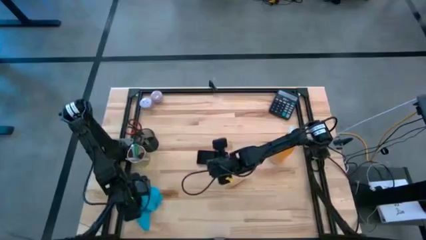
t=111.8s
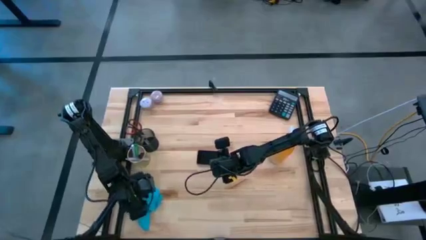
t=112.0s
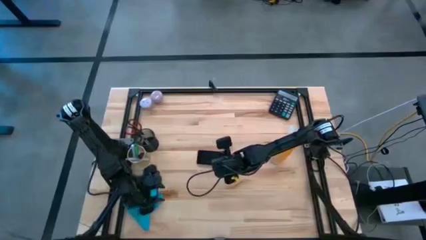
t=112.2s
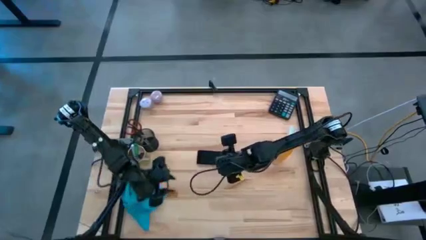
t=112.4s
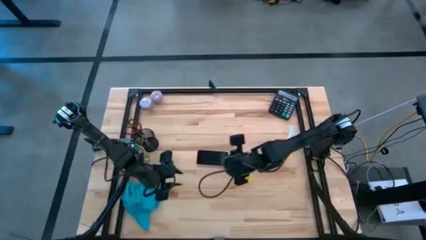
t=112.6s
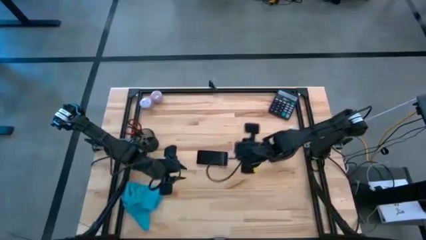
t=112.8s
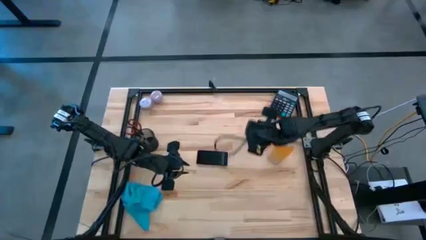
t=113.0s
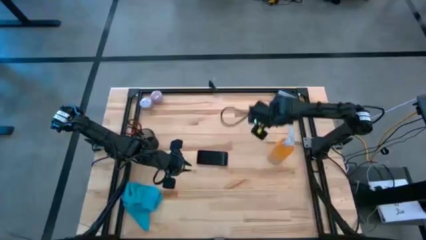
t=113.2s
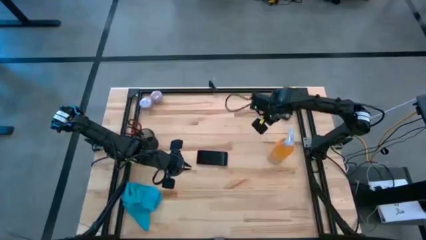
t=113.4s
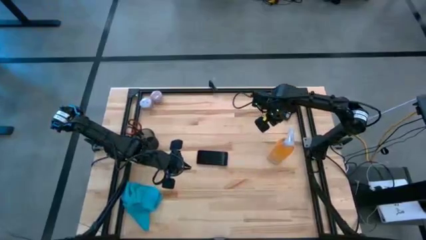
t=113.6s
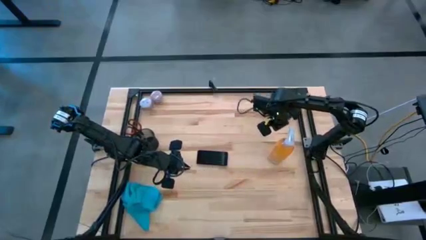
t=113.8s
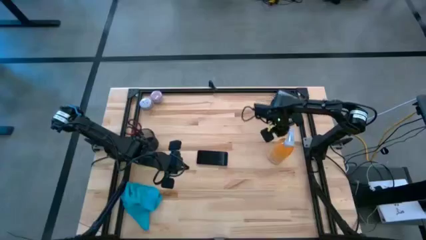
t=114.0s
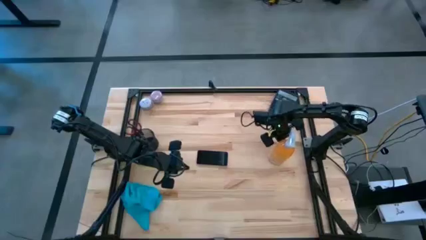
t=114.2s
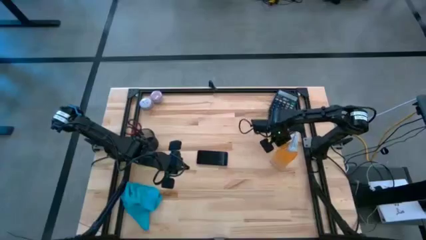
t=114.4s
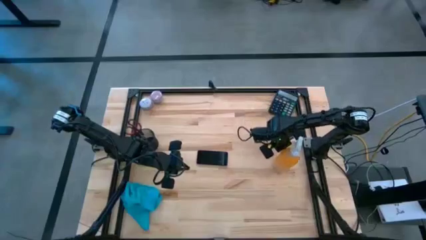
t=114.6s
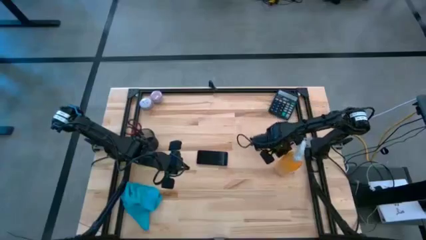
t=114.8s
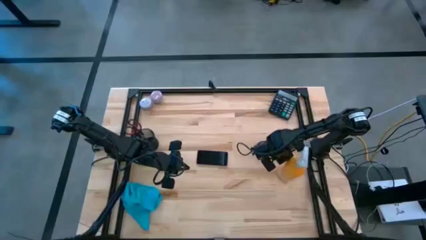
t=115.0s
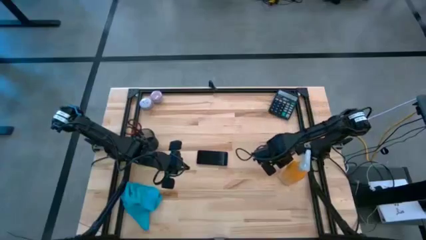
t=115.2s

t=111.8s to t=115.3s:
Task: Apply microfiber cloth
Move the orange spray bottle to the middle right of the table

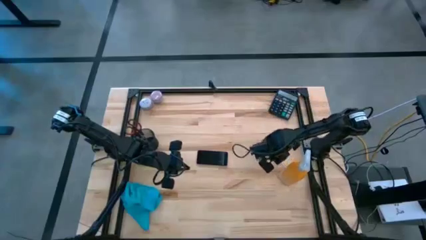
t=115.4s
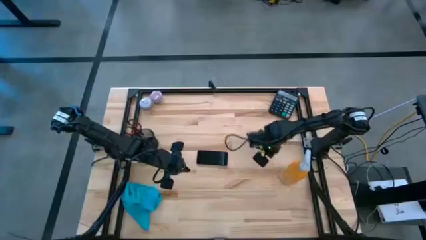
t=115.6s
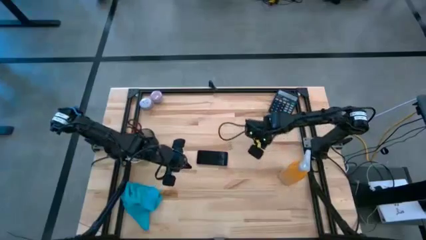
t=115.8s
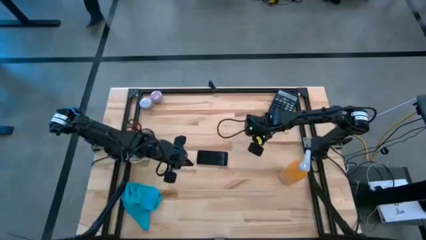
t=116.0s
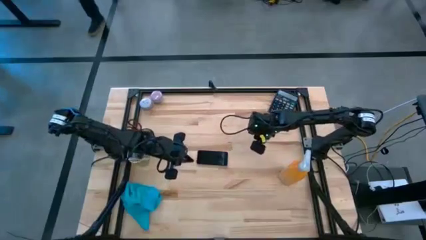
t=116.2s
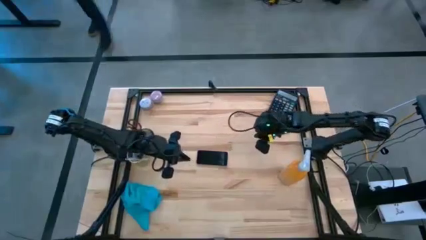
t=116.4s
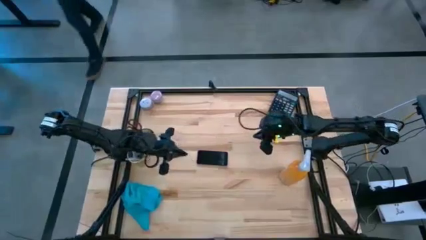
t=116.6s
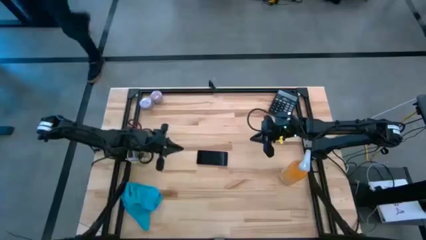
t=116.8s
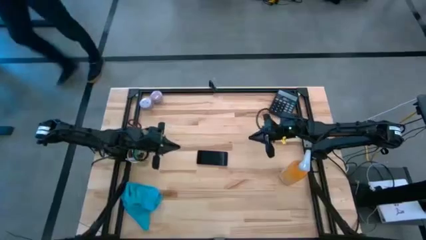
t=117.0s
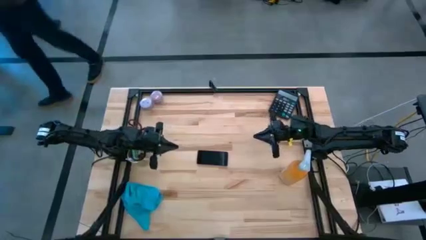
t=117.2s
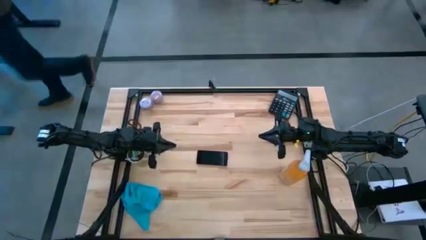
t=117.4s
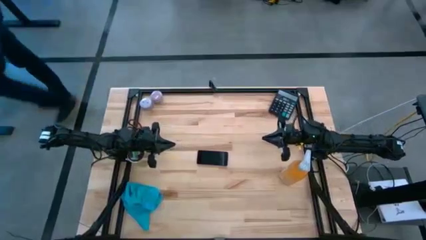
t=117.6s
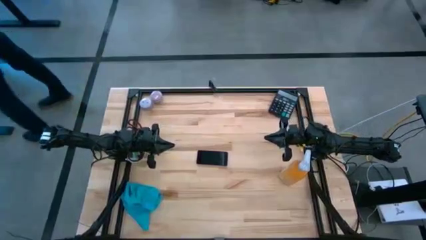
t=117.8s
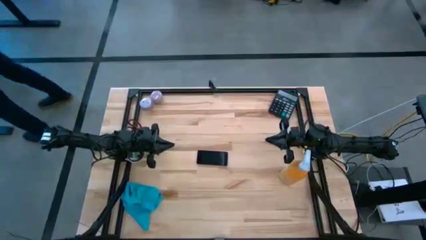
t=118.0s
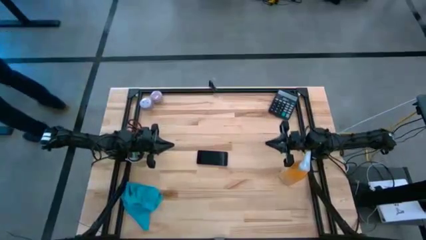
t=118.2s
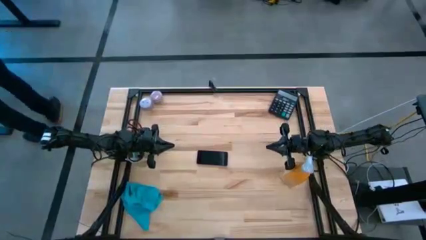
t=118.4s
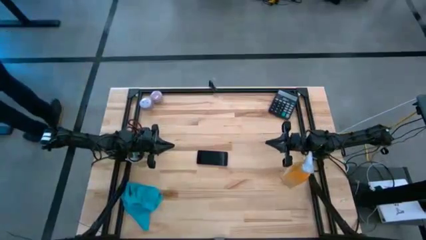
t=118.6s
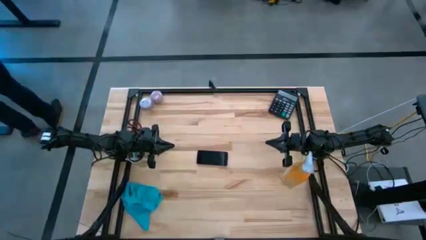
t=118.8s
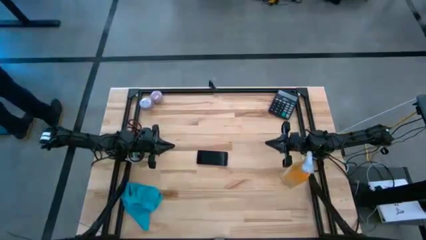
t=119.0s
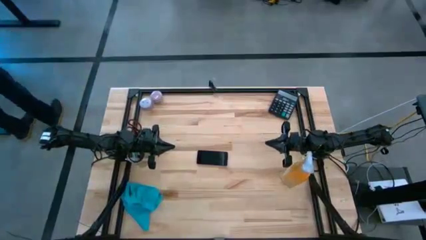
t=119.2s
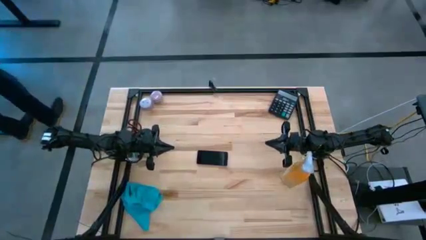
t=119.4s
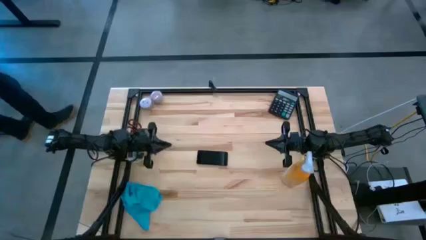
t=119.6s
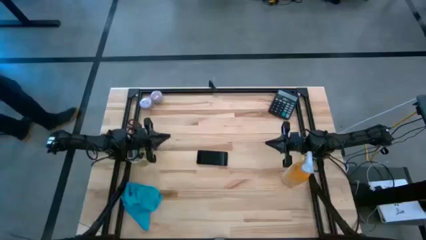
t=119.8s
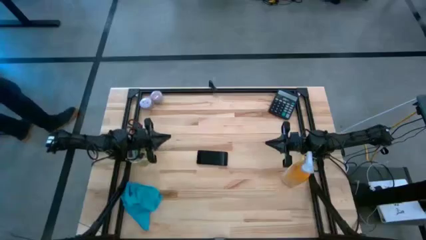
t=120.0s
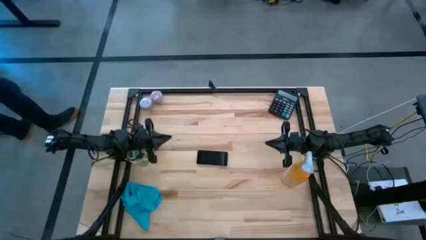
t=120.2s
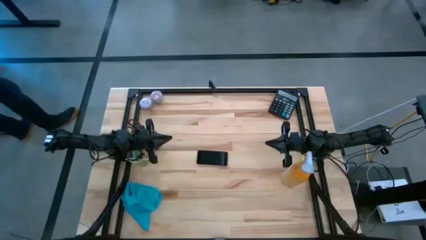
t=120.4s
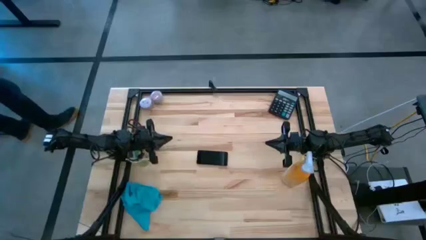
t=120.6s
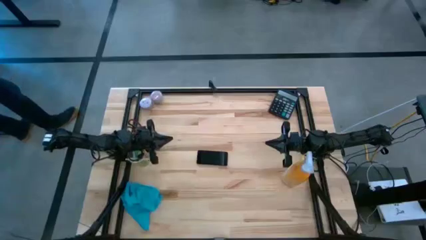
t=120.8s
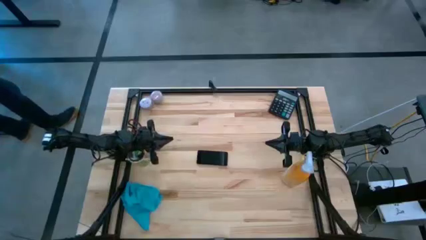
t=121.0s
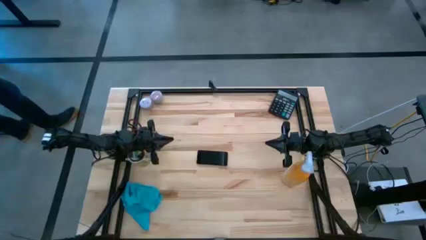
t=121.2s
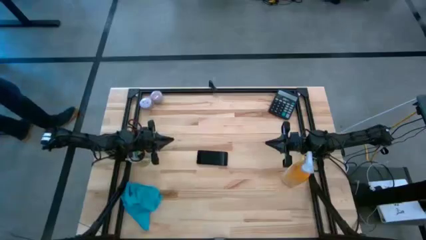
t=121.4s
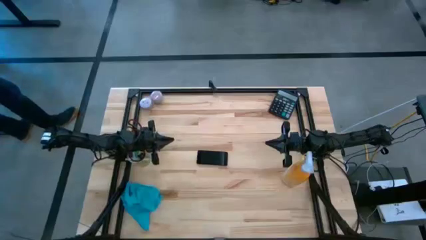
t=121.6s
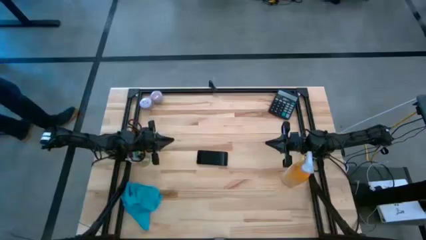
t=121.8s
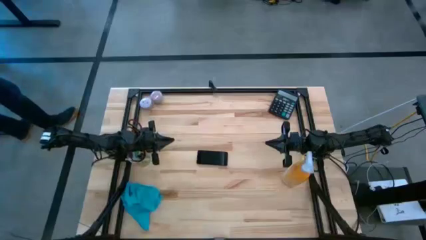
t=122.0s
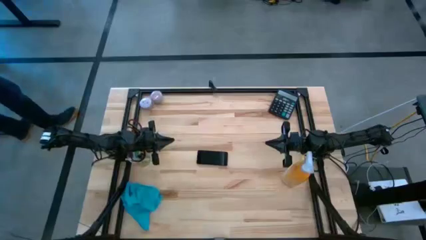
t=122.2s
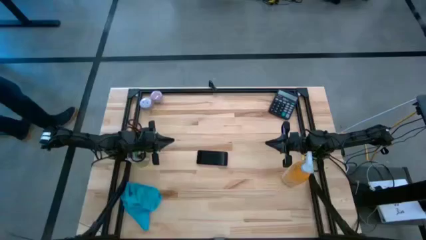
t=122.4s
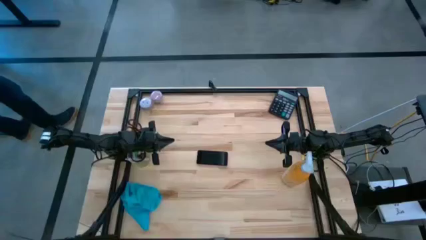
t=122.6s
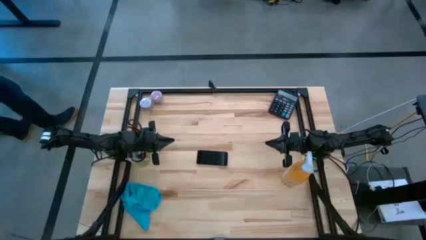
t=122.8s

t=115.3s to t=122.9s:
Return to Home Position

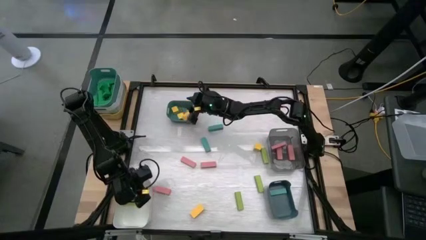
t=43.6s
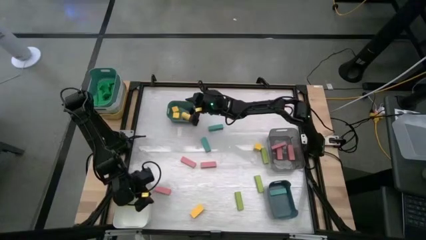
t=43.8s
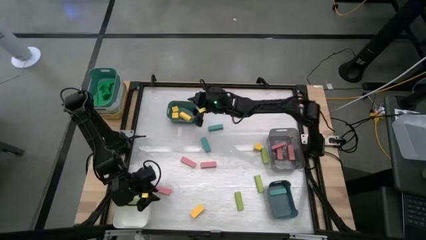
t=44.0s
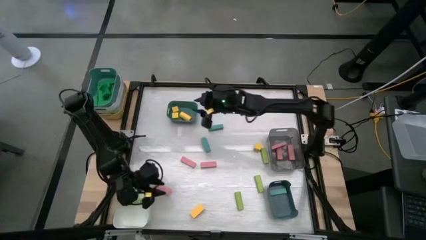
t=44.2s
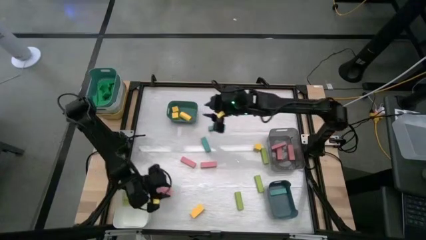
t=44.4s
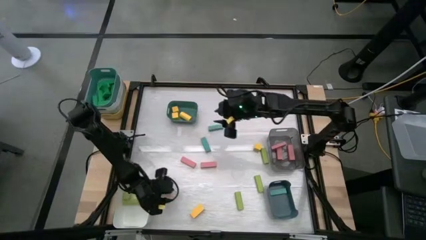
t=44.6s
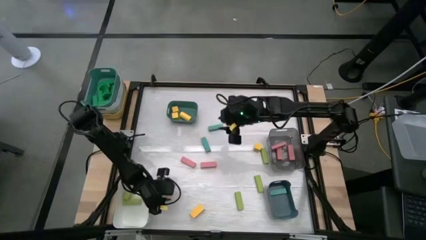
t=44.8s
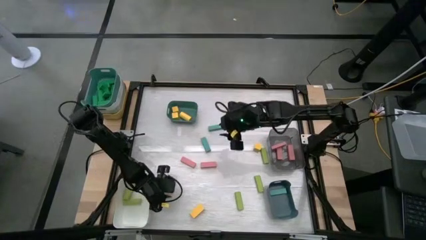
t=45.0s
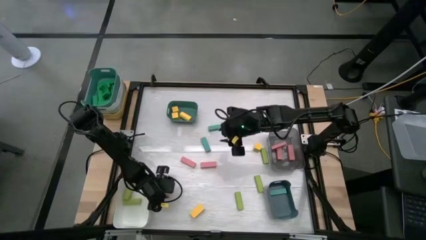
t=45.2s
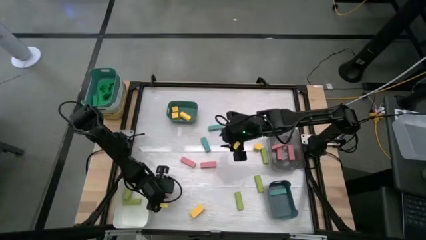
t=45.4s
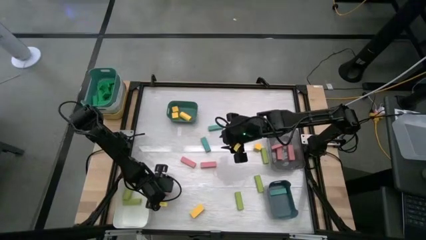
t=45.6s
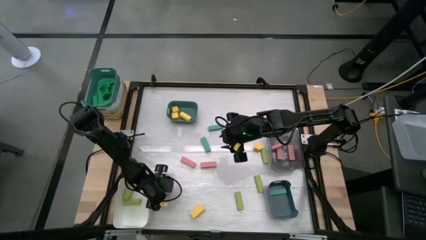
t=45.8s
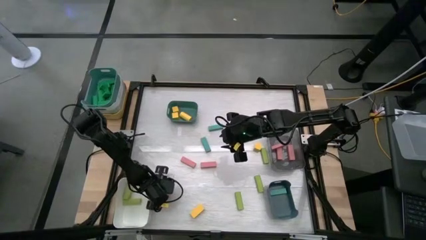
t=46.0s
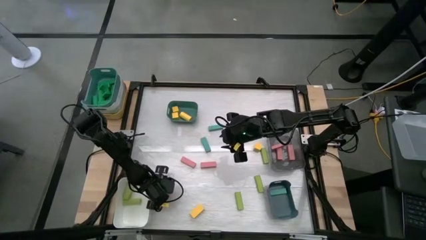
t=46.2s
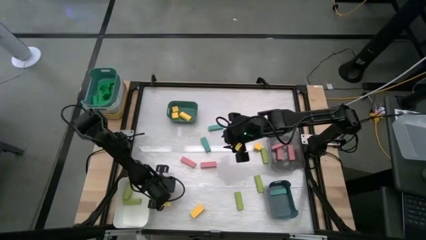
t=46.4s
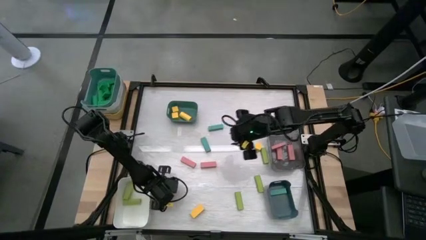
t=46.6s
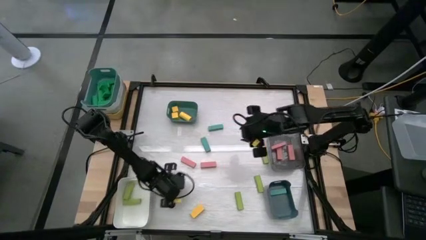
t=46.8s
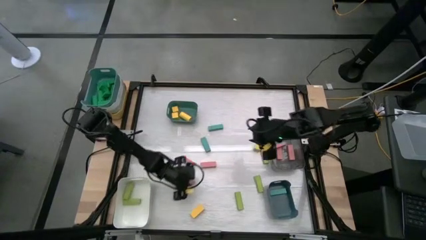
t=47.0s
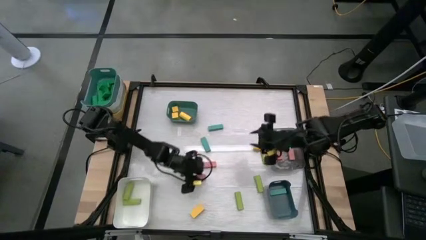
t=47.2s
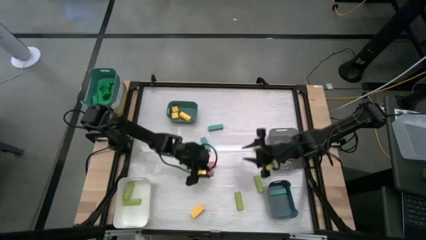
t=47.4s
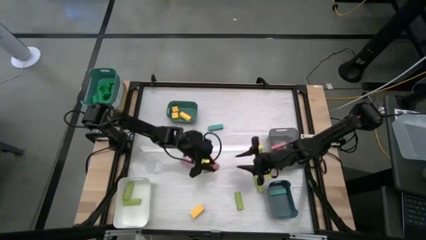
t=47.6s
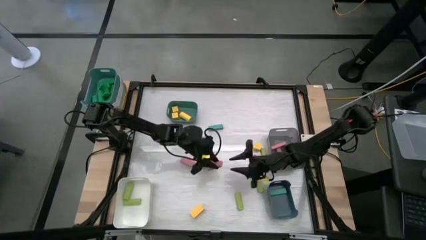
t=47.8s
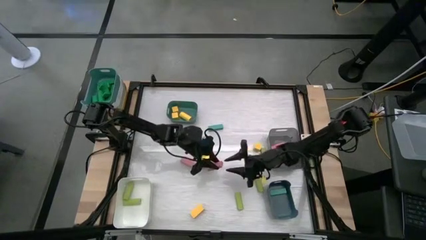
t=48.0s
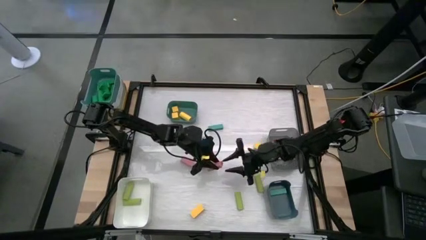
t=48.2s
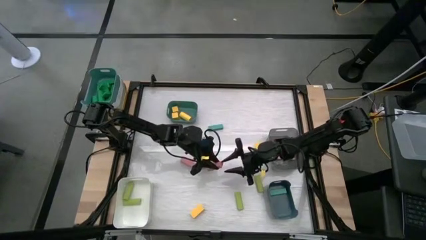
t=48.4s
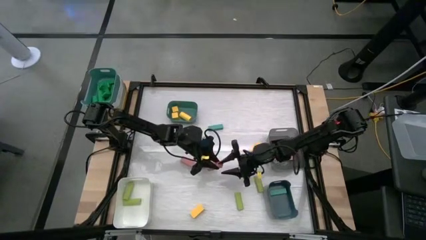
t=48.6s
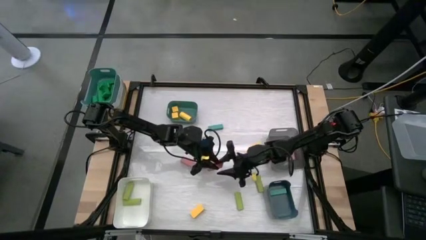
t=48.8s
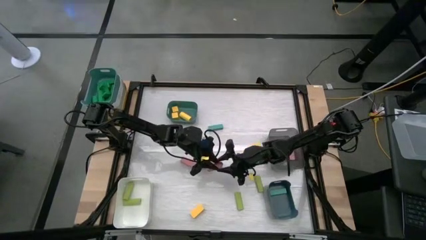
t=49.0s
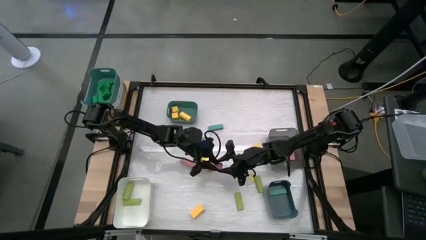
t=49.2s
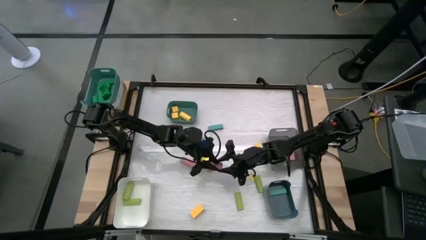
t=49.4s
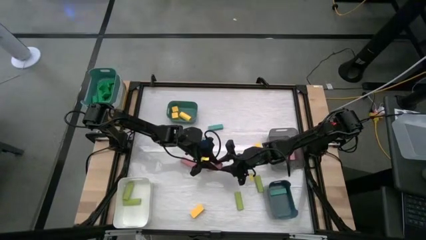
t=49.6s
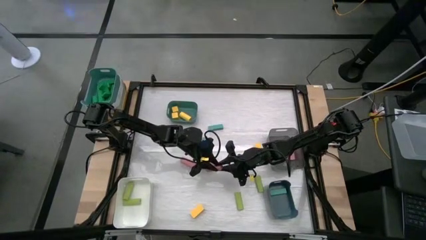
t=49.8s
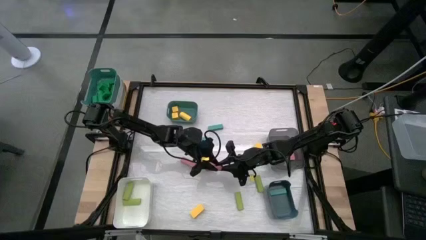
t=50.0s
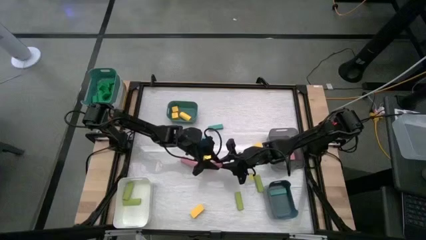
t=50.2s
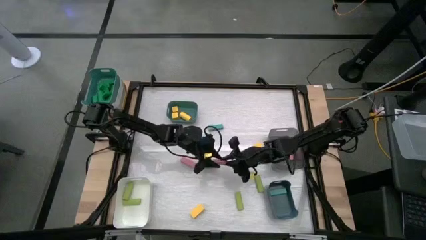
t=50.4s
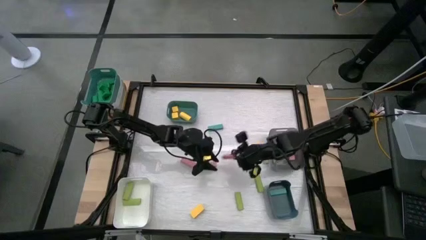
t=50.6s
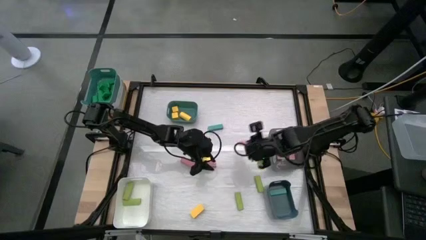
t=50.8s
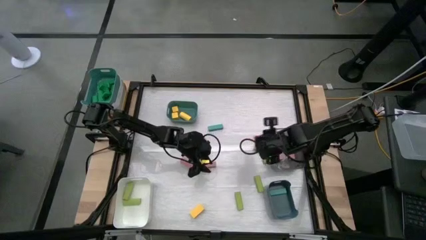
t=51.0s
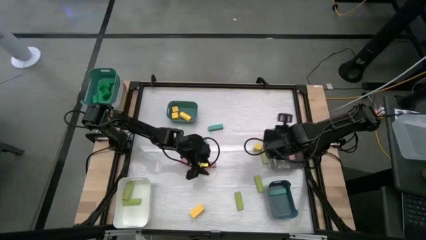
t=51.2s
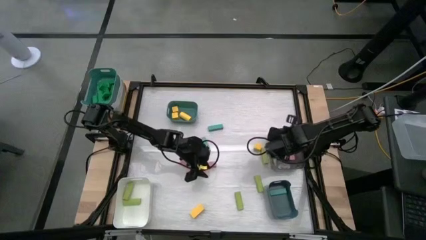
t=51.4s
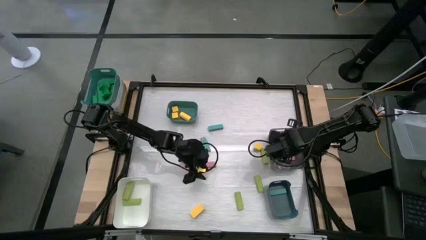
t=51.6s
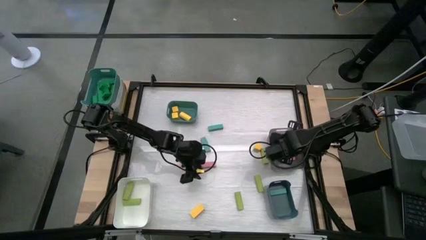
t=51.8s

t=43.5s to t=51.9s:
Task: Sort blocks
Put the pink block into the black bin
